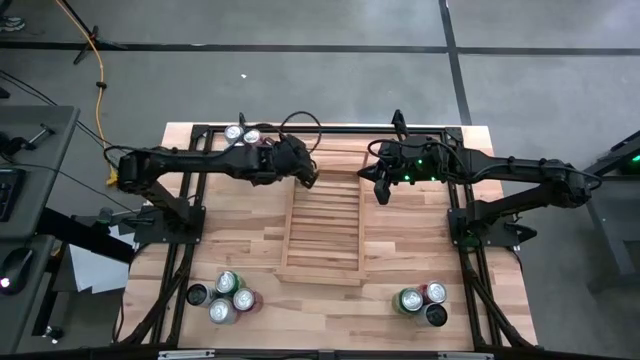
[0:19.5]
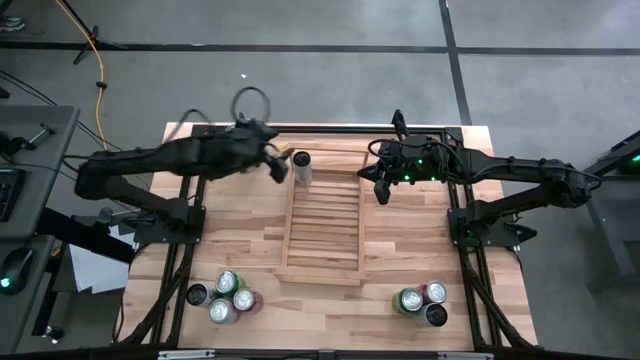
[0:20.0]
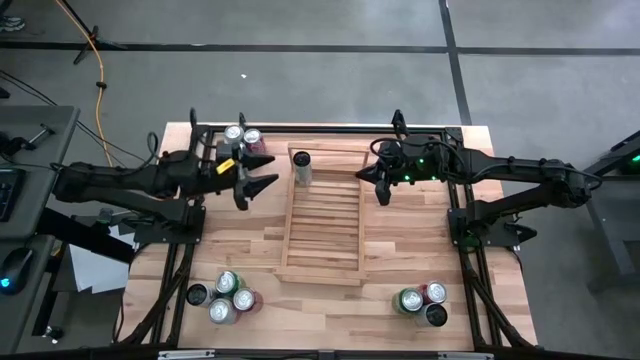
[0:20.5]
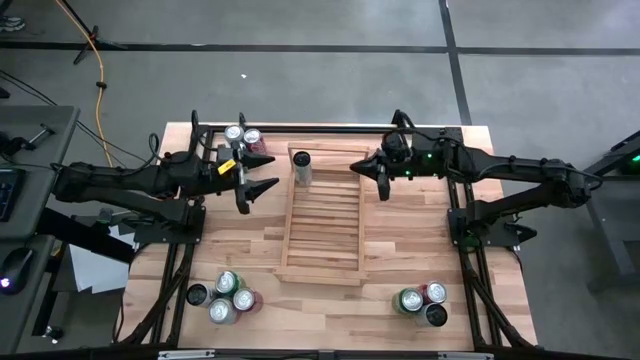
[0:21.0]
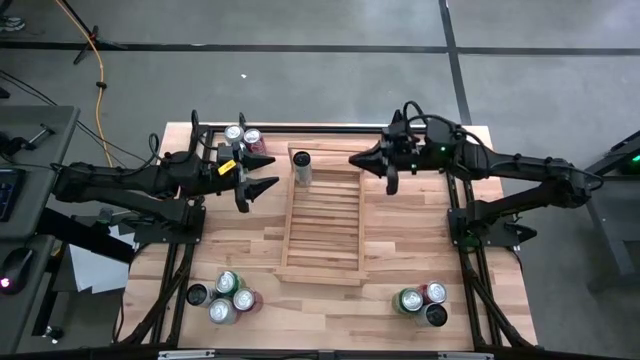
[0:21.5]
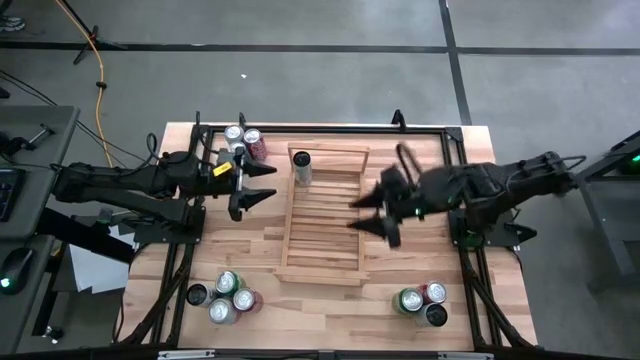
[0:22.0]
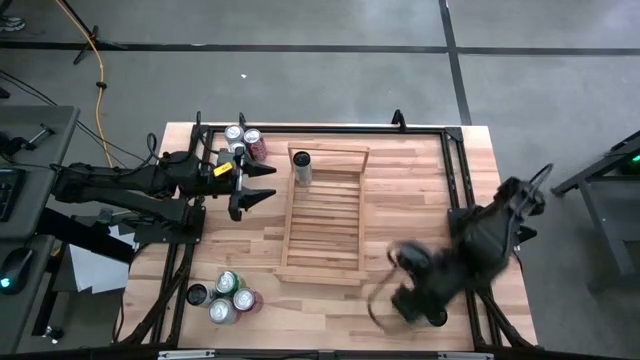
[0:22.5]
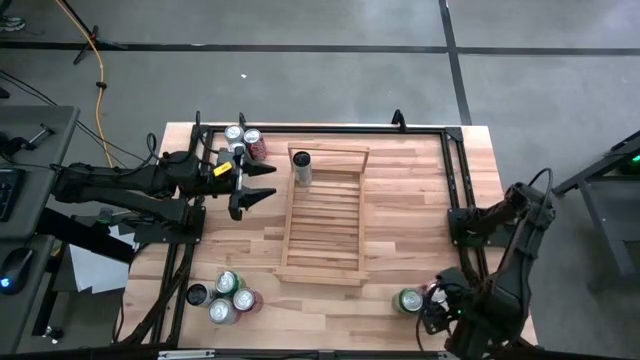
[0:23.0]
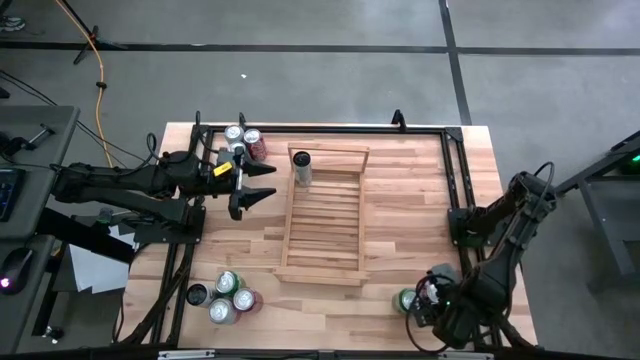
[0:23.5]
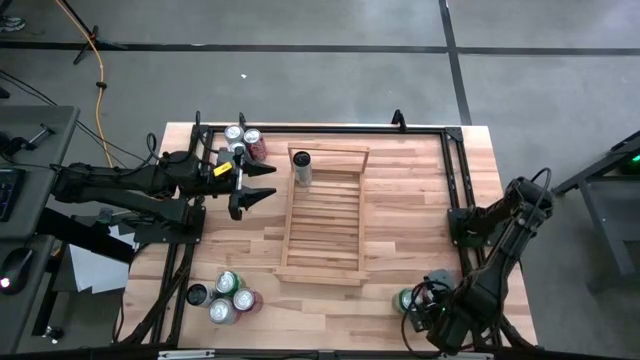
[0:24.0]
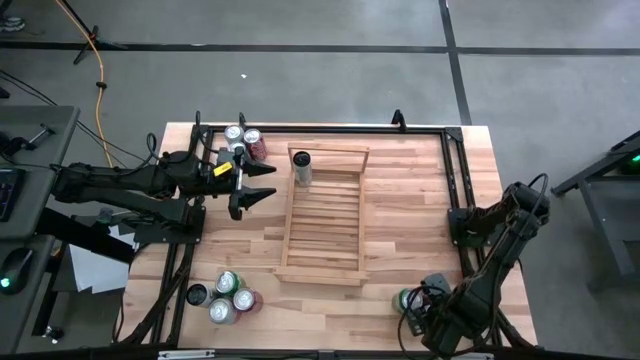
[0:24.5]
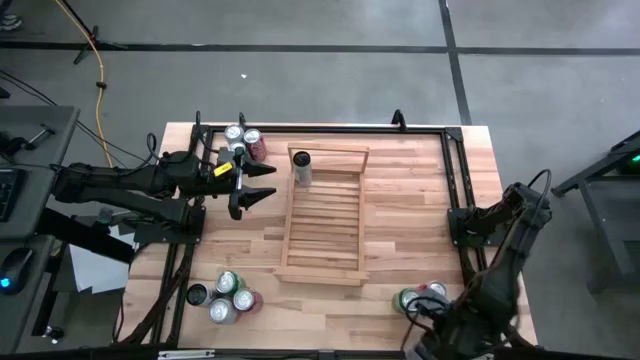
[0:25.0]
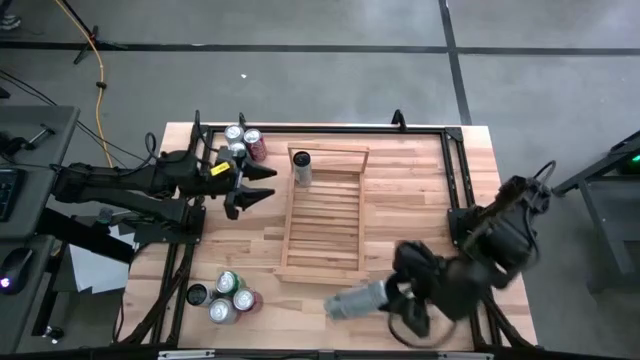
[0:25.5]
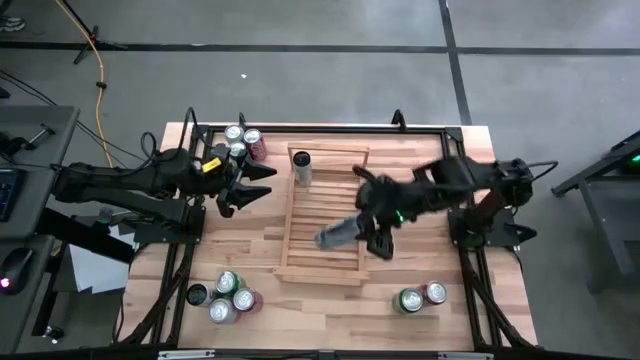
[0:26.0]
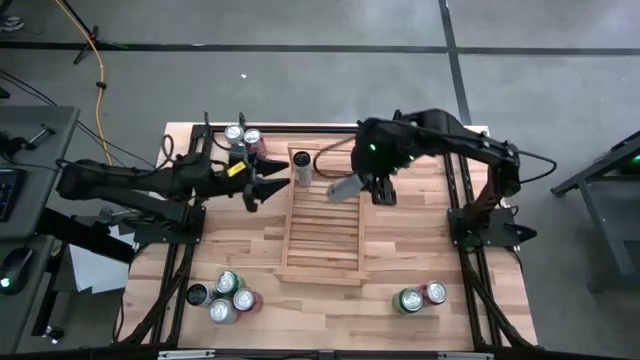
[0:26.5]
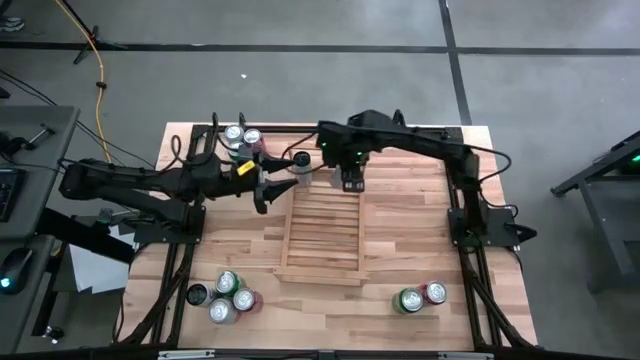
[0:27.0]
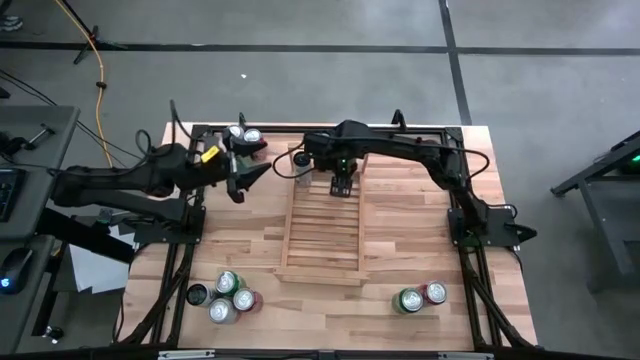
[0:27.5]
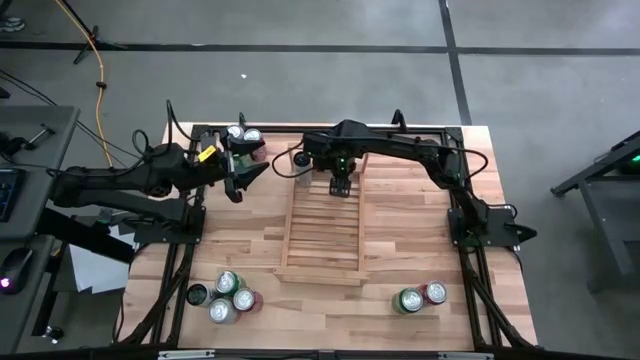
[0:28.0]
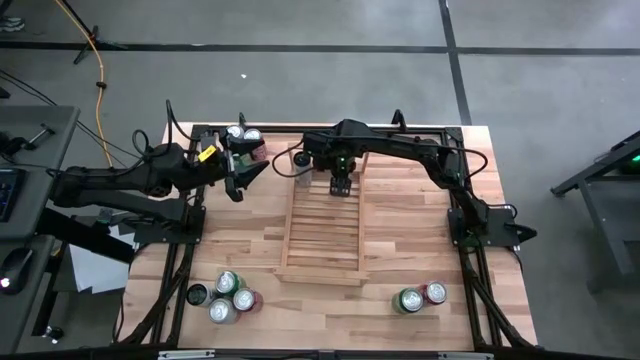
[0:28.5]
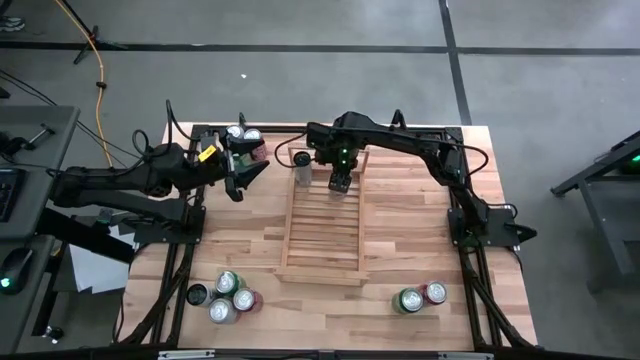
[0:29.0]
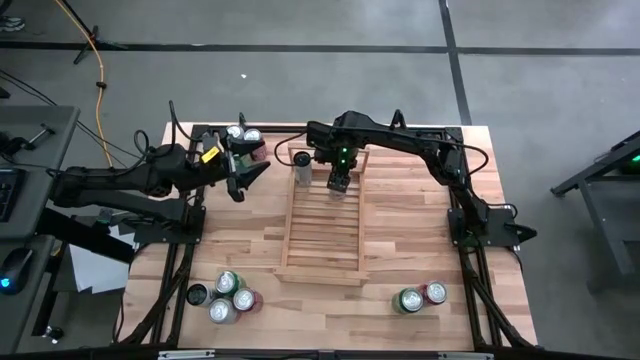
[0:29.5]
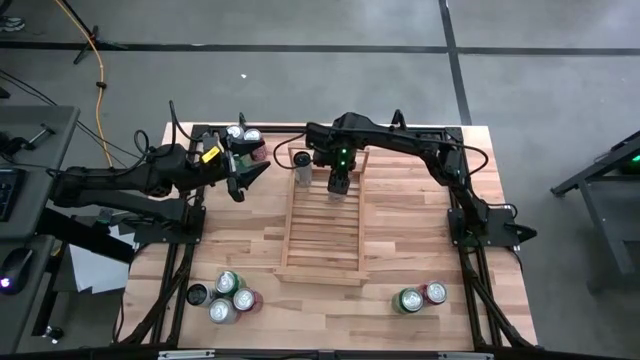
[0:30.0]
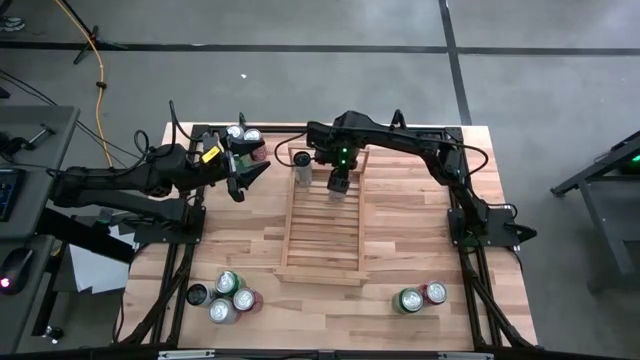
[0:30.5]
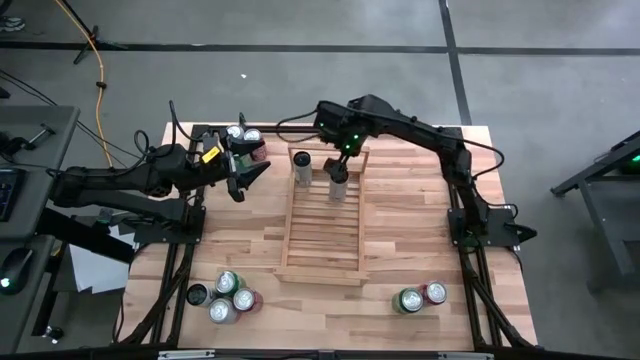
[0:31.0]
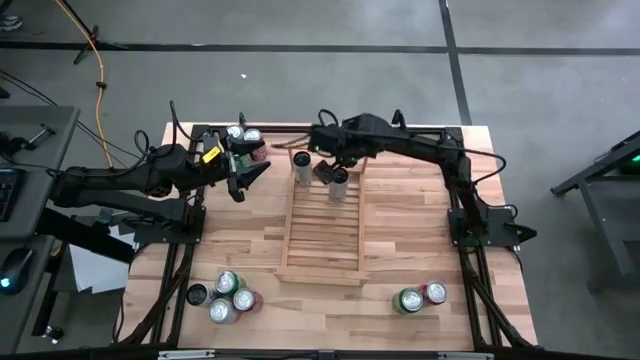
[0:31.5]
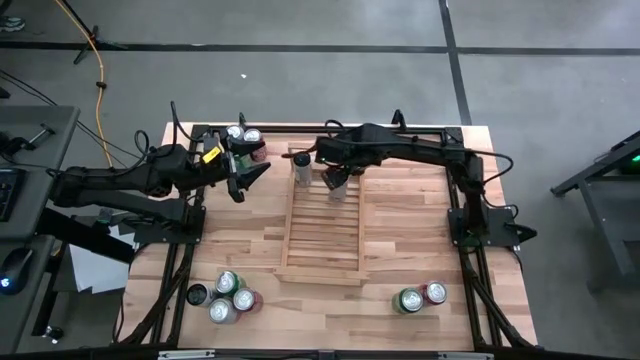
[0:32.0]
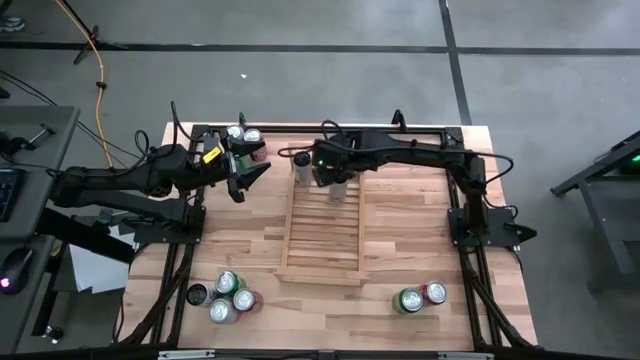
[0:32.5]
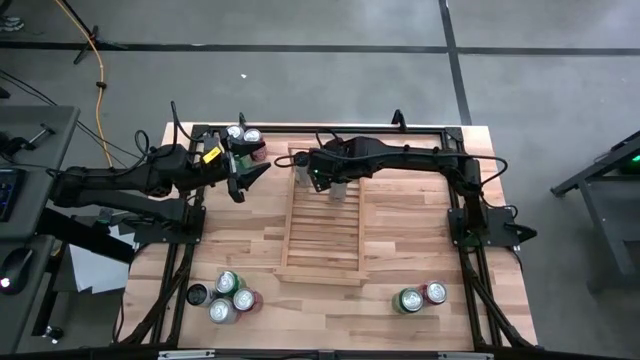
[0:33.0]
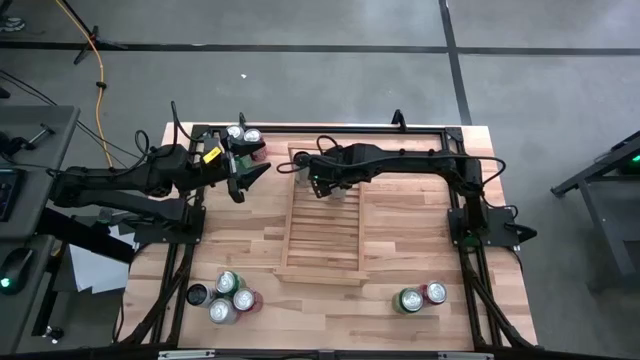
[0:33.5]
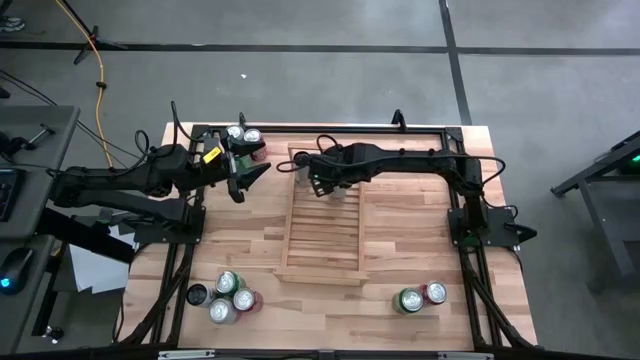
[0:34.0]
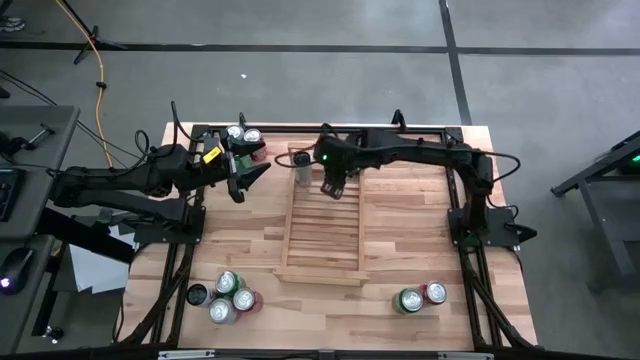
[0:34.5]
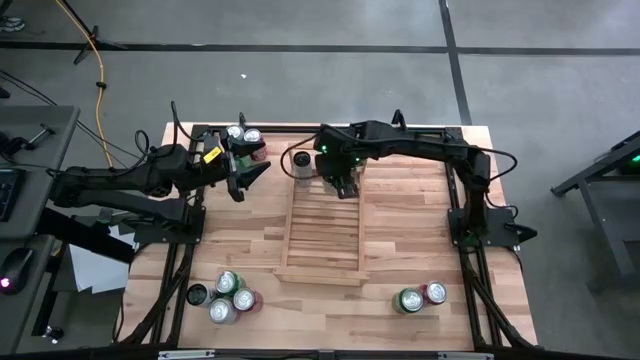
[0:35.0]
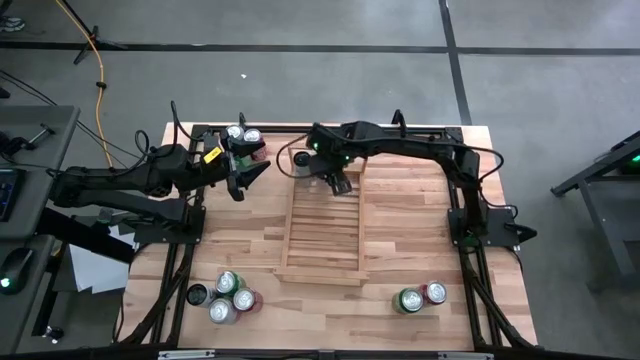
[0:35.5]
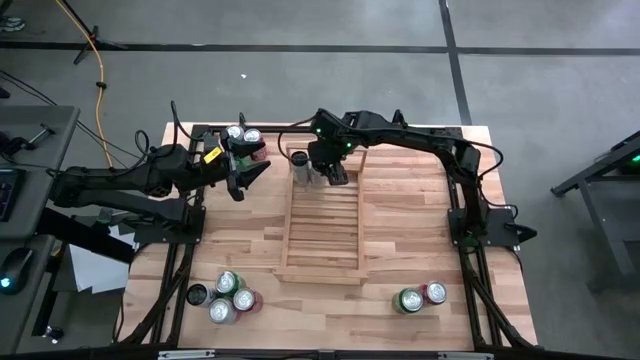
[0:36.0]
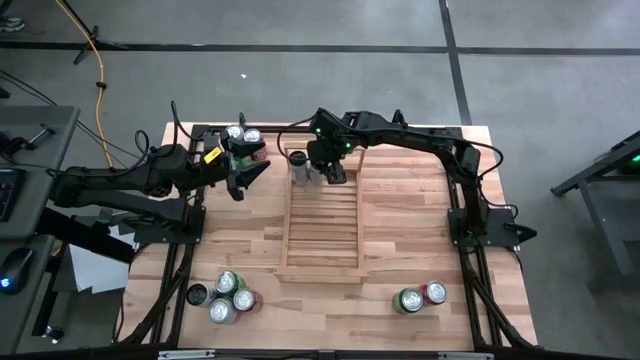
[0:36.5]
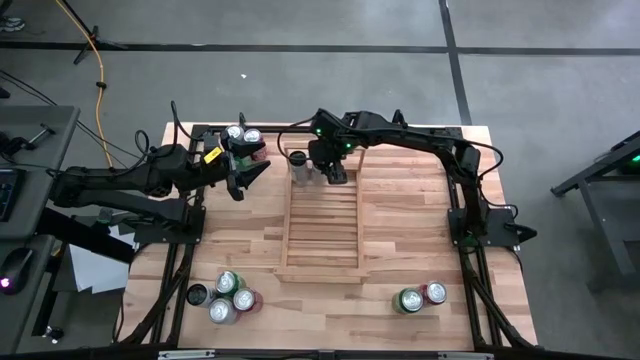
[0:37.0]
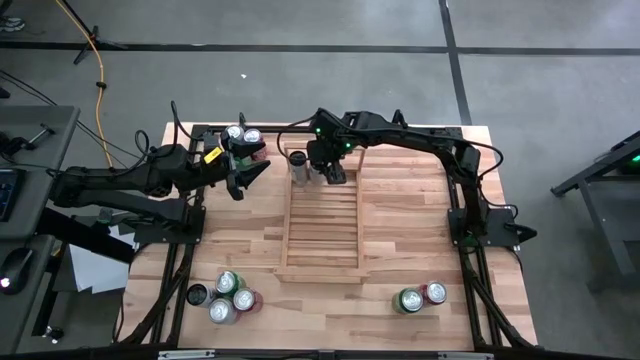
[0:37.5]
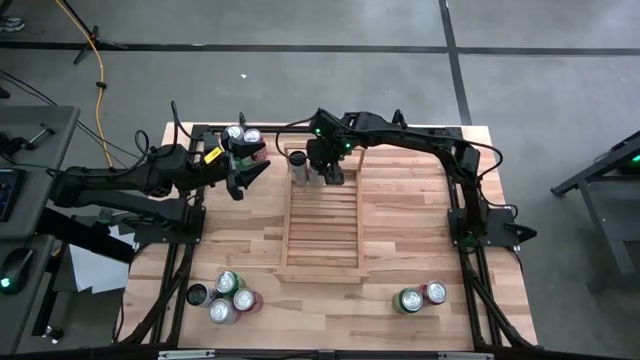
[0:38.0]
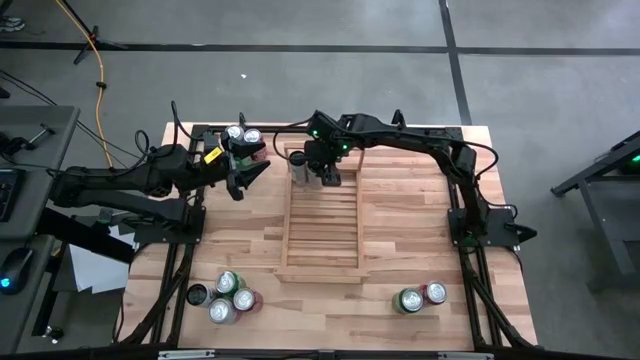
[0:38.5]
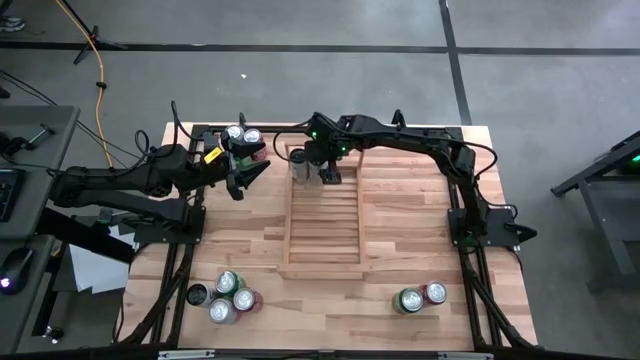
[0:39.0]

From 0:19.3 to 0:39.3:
Task: Place canned beverage on shelf
Put the right white and pink can on the shelf aligned with the other white and pink can

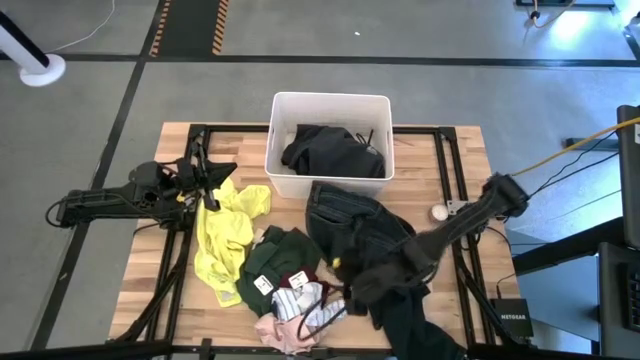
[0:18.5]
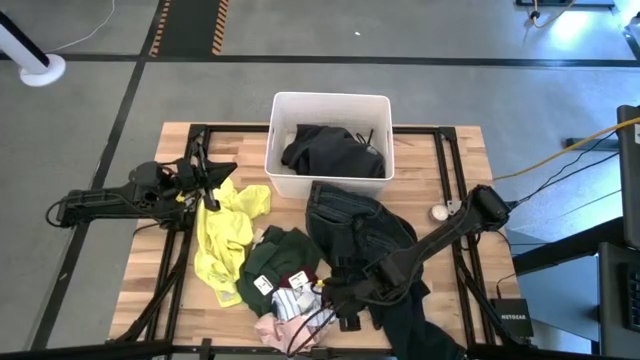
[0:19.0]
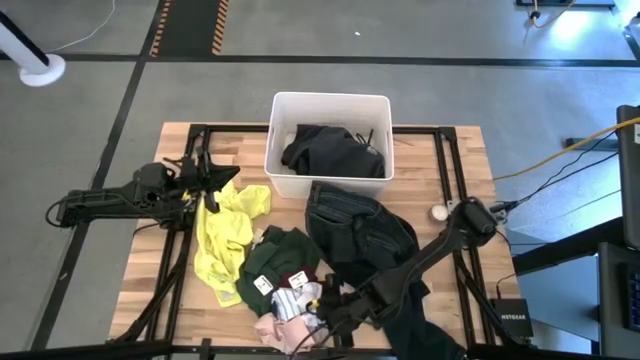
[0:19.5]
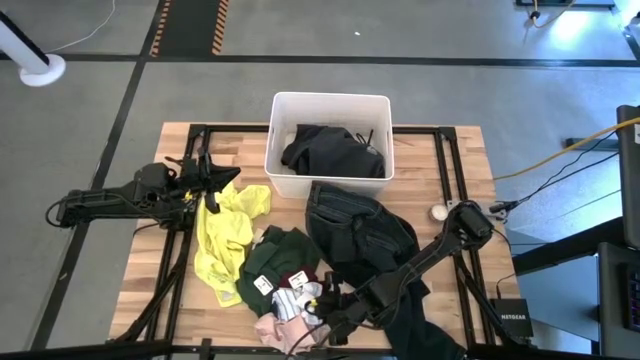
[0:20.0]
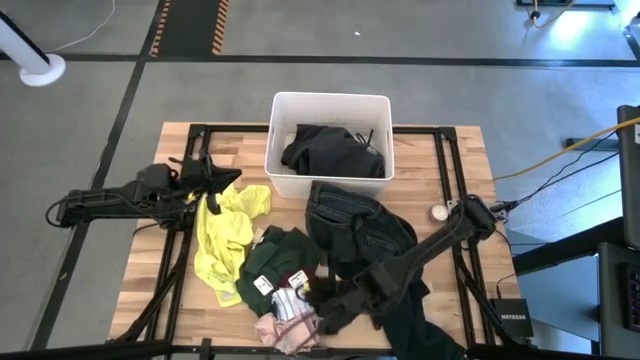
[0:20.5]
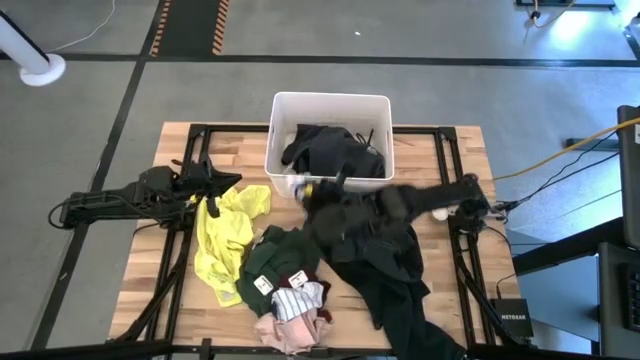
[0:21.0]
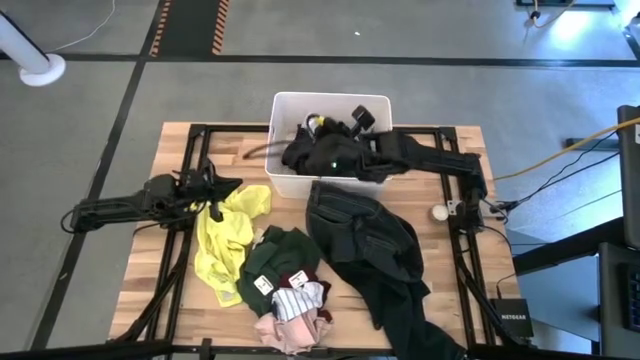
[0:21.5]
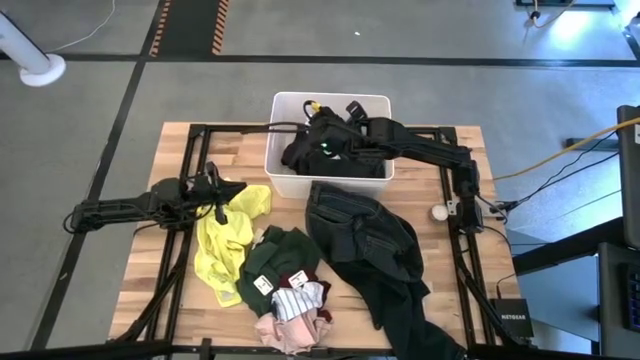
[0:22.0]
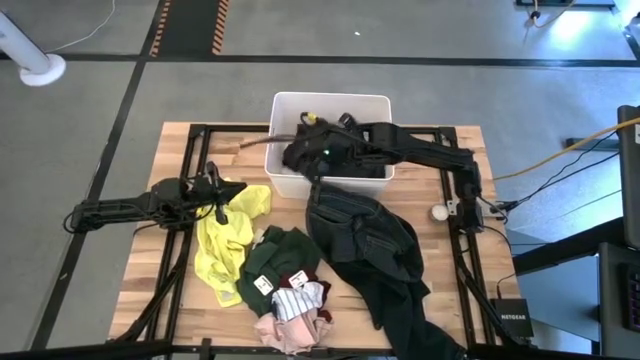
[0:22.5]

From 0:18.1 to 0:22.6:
Task: Sort clothes
Put the bottom white sock into the white laundry organizer
